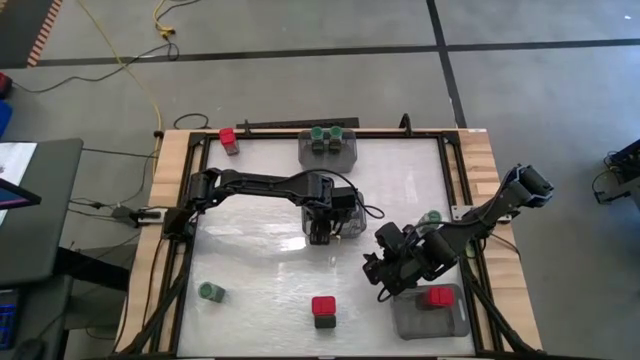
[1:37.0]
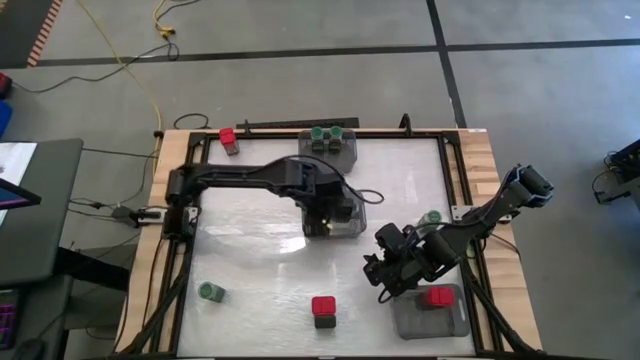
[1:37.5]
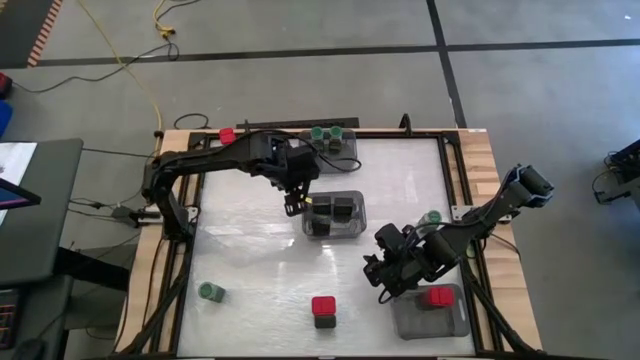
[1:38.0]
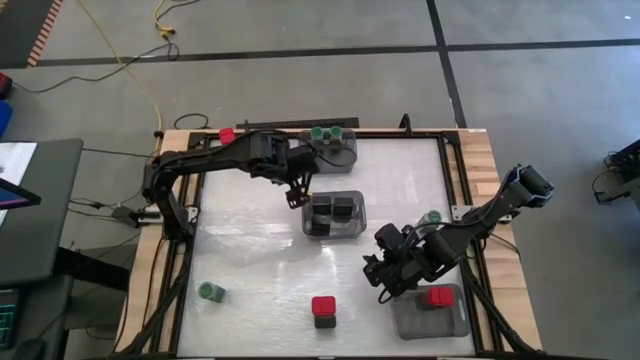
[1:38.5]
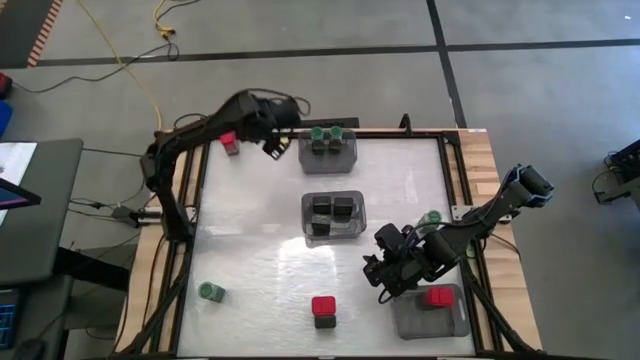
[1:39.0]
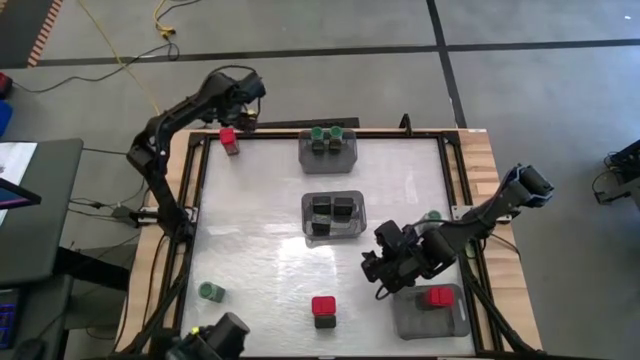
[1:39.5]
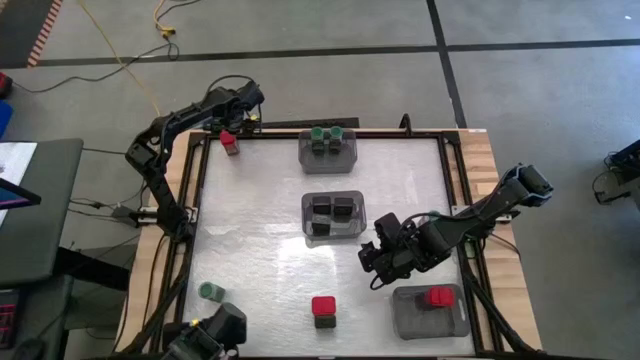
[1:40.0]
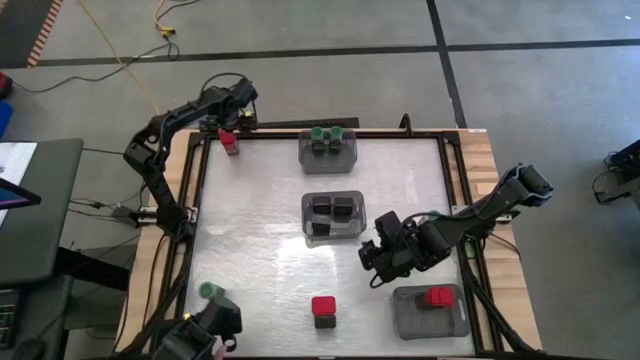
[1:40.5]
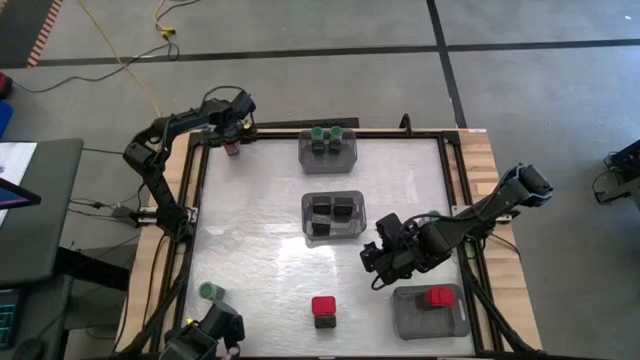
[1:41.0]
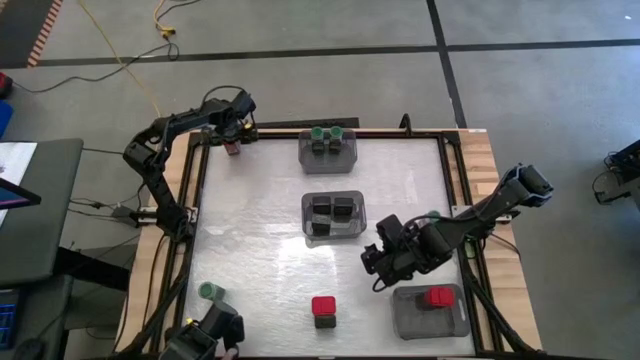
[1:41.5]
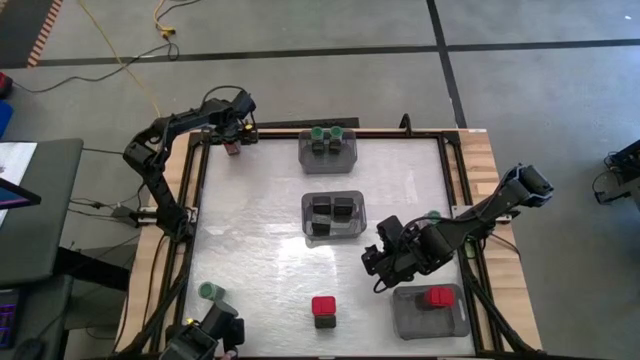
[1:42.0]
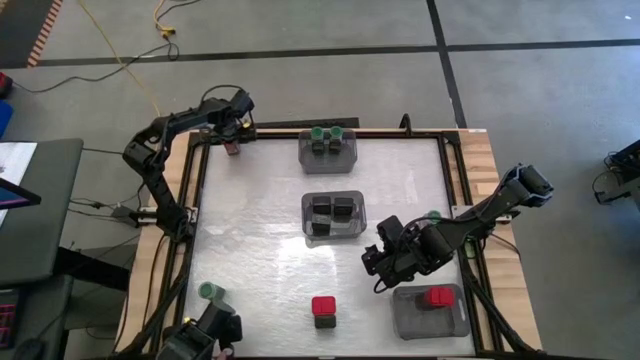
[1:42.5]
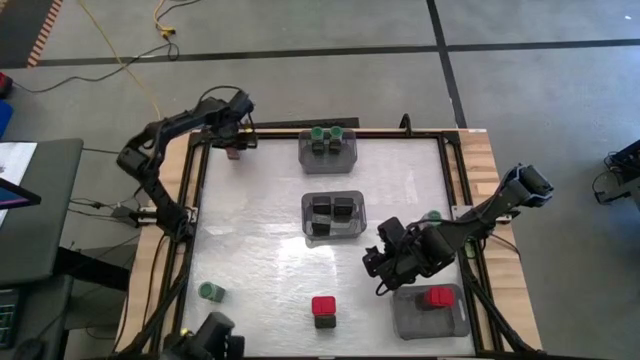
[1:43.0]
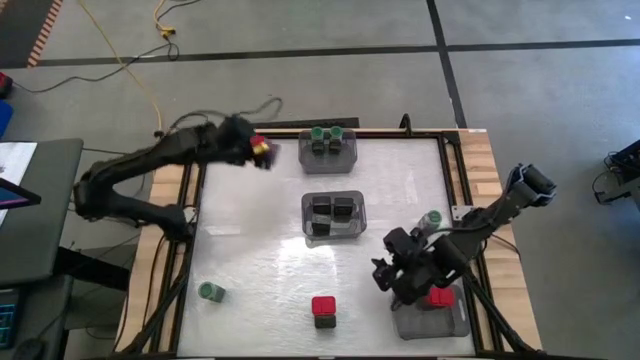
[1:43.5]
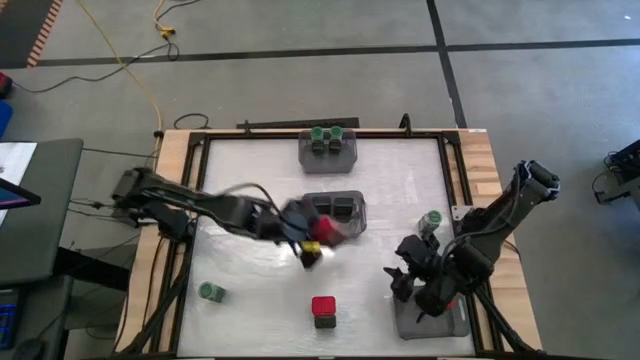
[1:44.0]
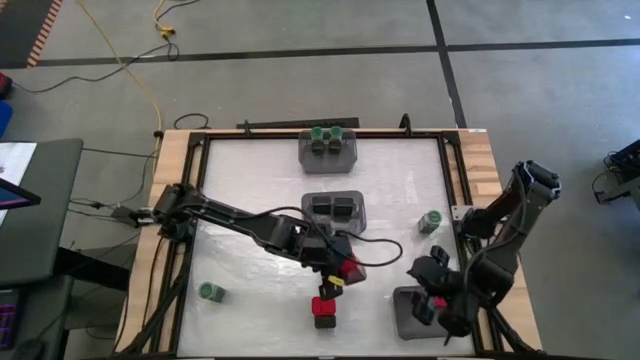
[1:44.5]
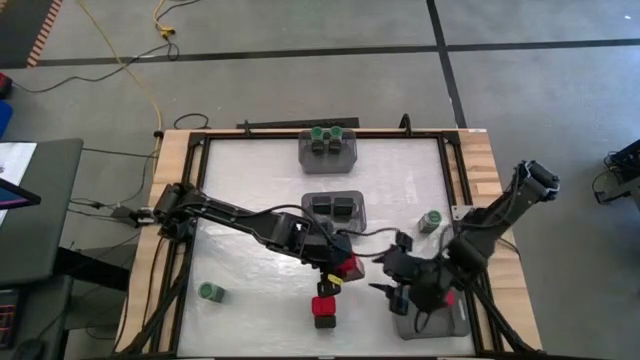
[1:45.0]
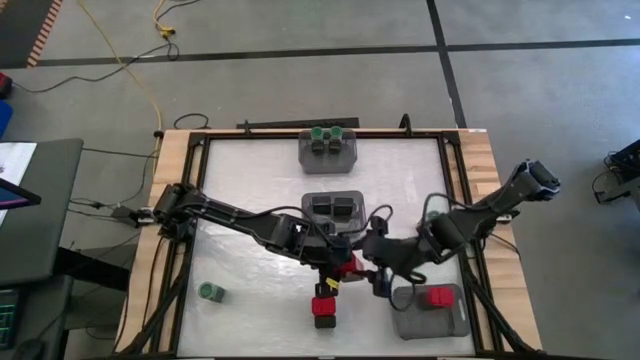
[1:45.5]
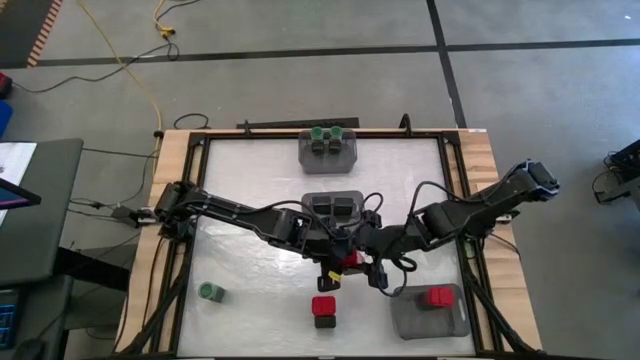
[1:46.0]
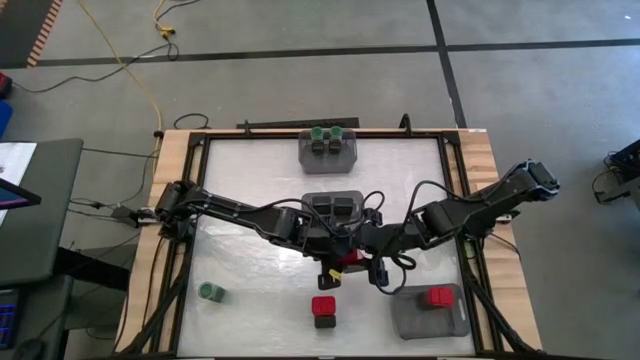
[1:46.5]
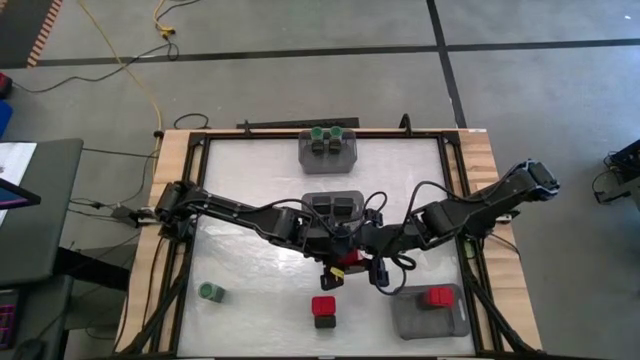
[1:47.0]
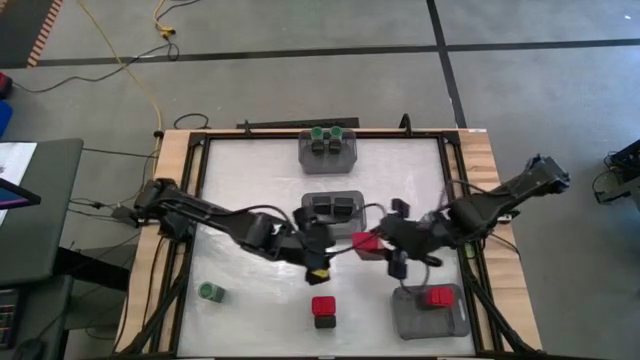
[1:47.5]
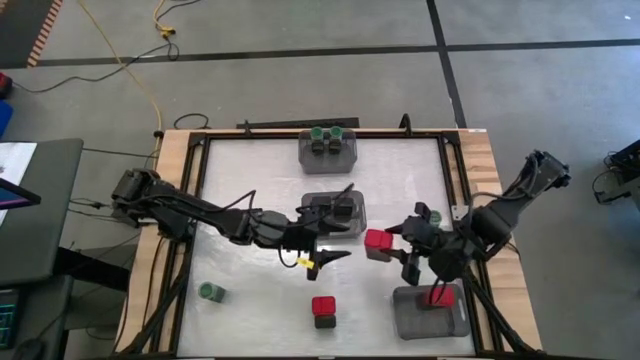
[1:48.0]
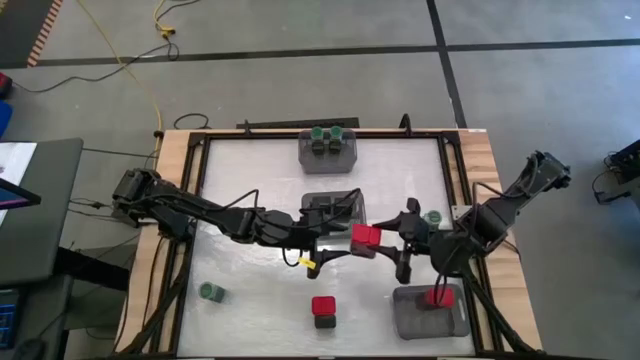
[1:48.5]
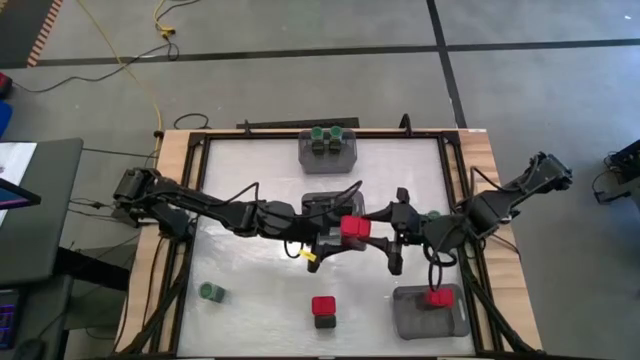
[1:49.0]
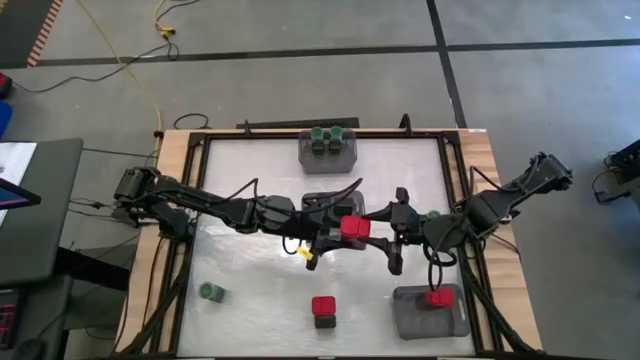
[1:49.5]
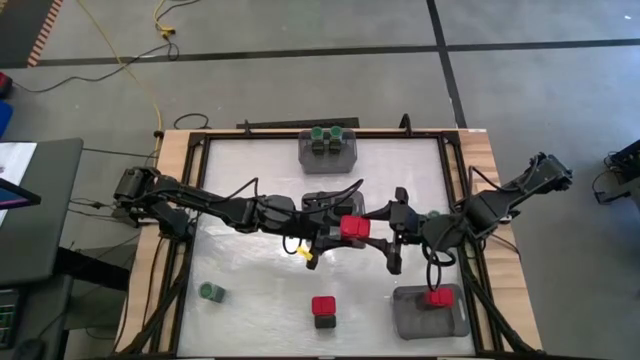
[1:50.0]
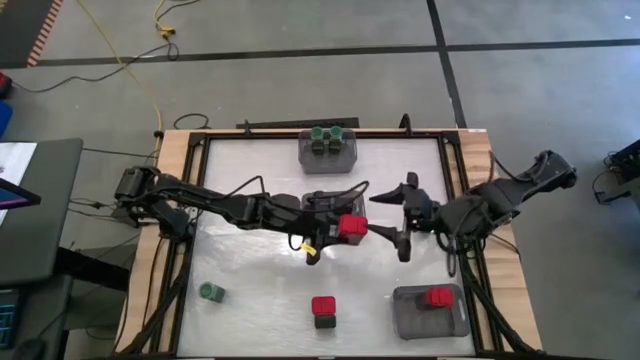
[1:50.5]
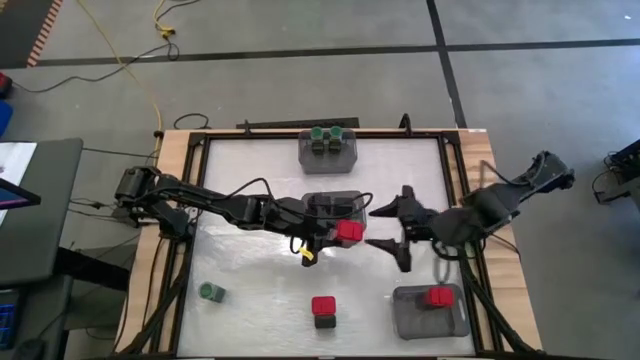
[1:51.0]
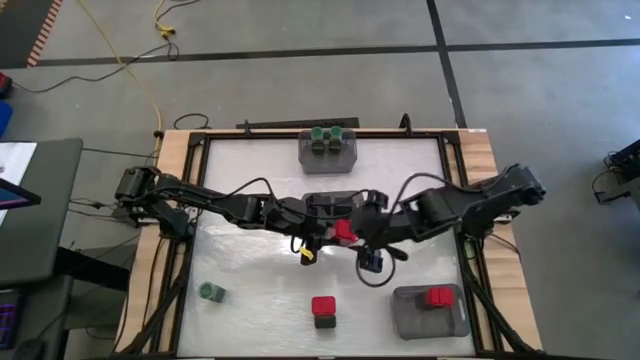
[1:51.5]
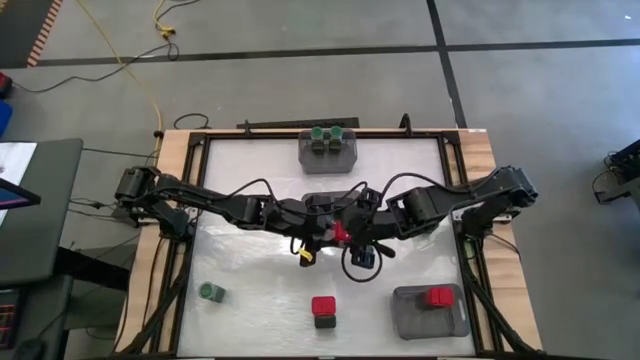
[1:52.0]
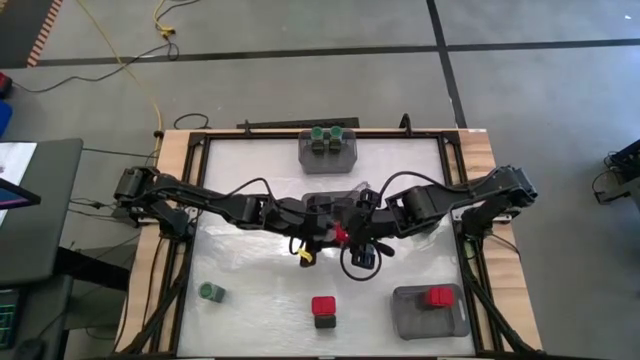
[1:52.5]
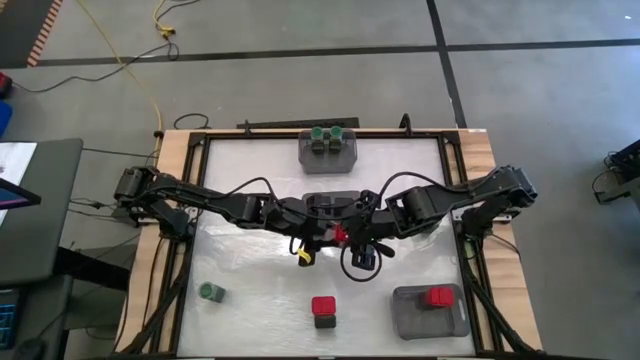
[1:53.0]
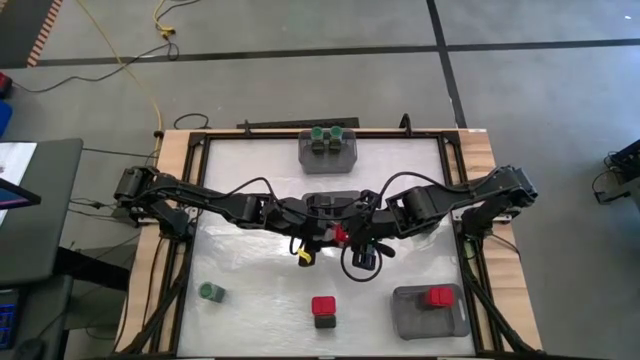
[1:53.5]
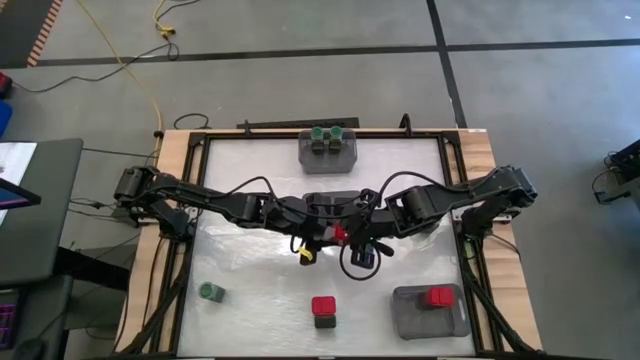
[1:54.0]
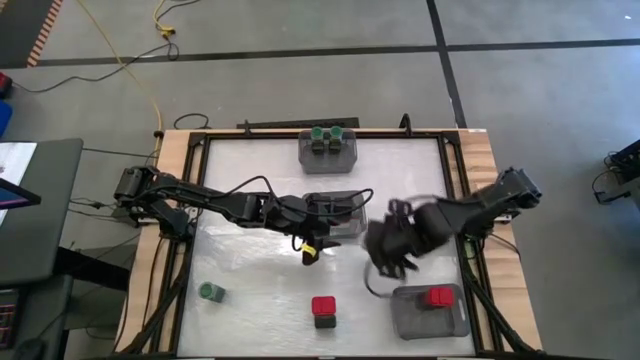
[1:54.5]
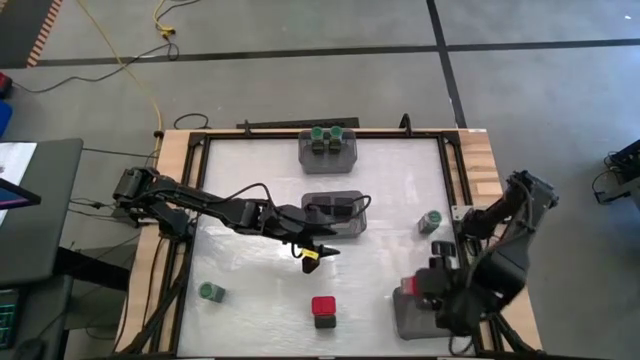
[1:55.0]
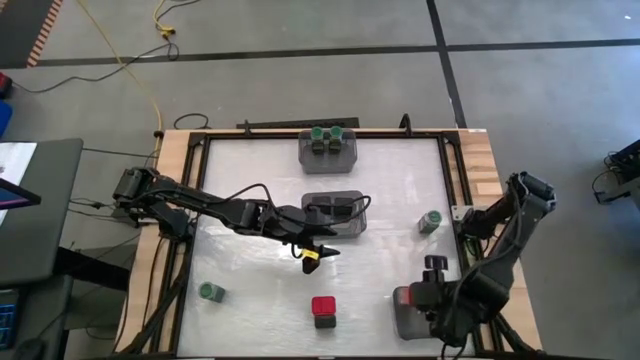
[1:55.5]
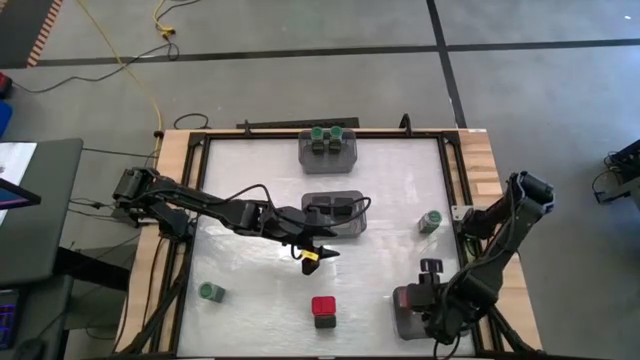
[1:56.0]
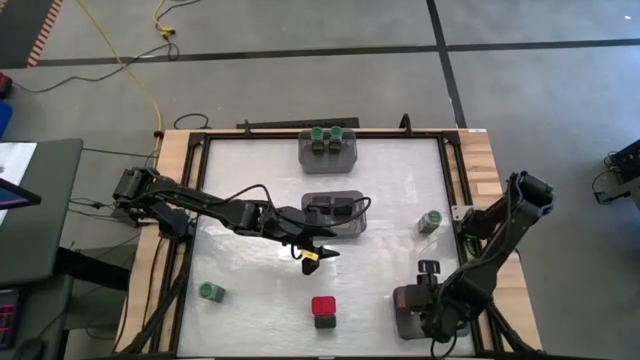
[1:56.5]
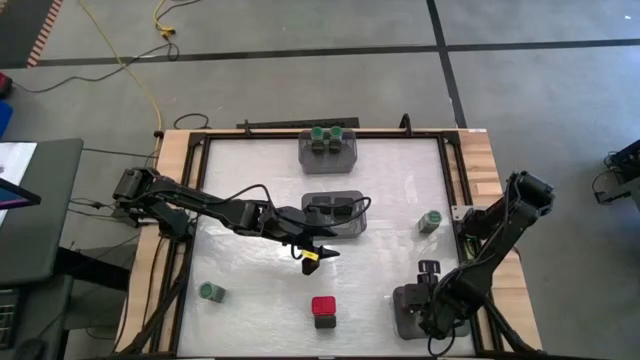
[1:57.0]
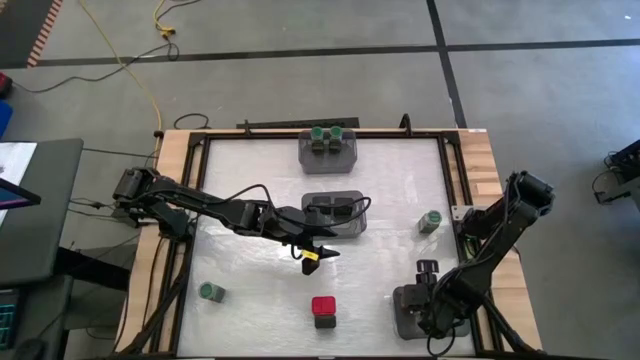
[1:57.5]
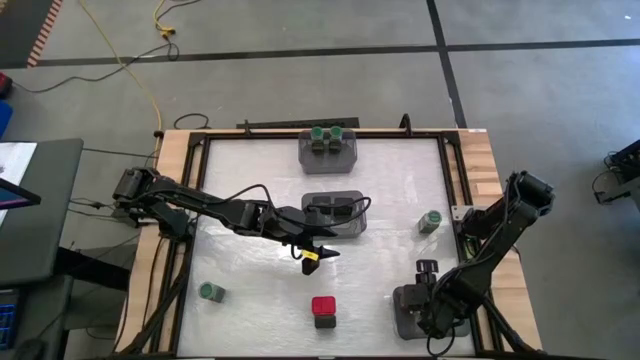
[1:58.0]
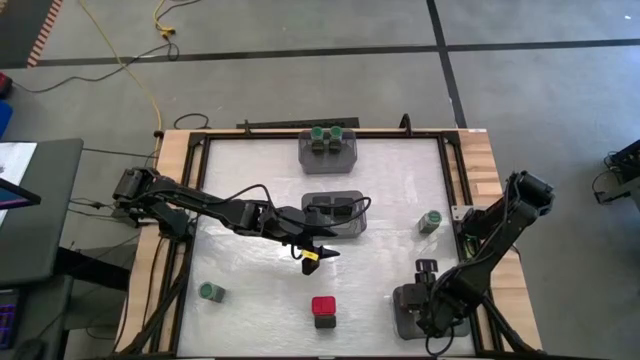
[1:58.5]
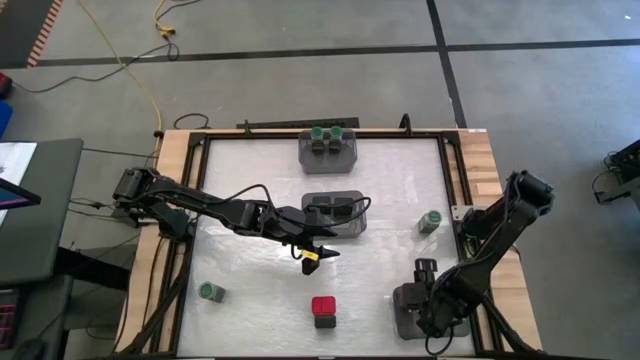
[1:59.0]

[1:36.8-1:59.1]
Task: Sort spices by type
Put the red seasoning can into the bottom black bin
